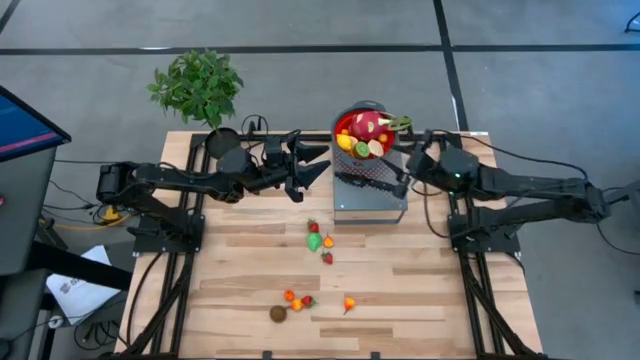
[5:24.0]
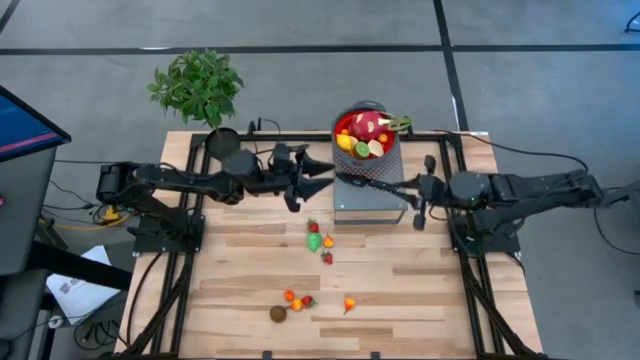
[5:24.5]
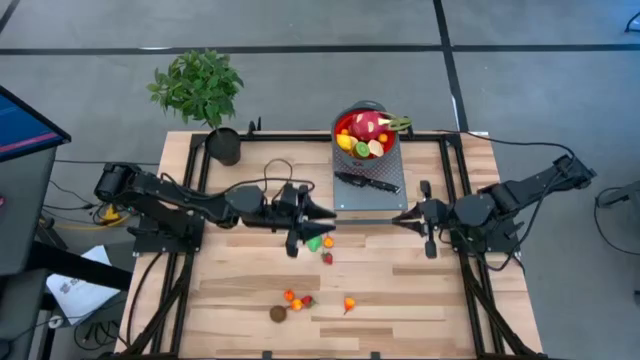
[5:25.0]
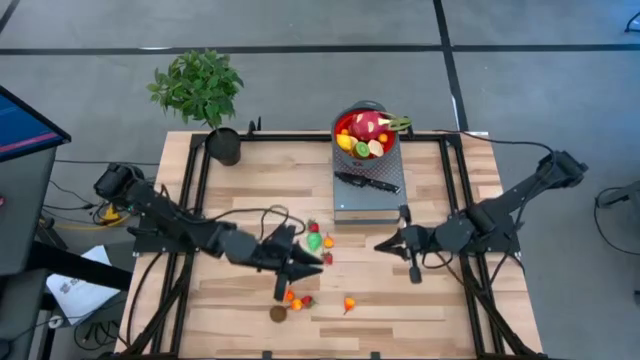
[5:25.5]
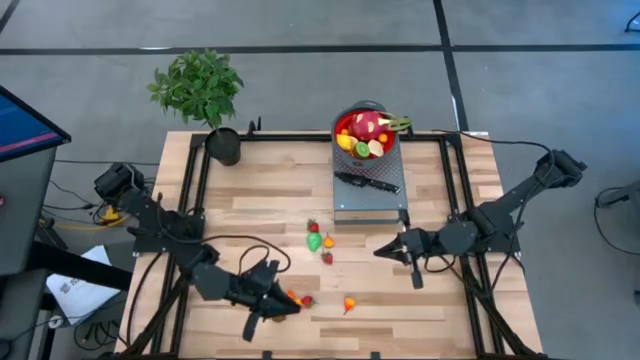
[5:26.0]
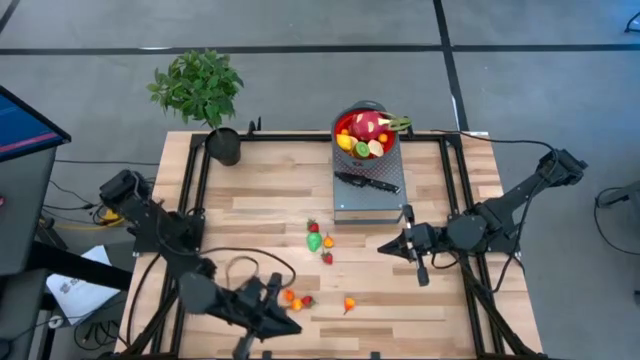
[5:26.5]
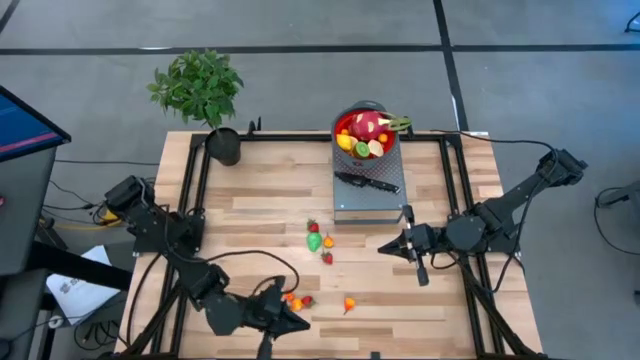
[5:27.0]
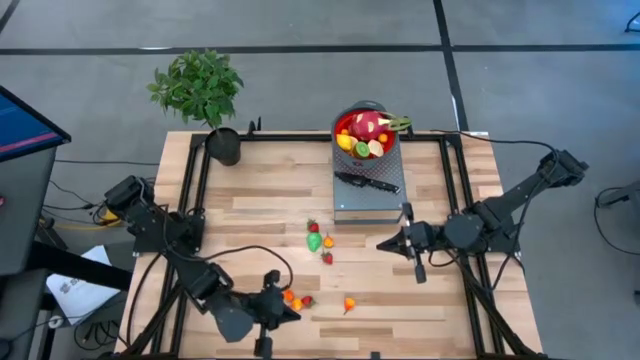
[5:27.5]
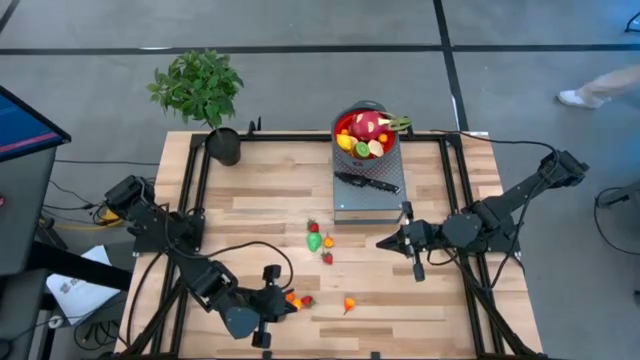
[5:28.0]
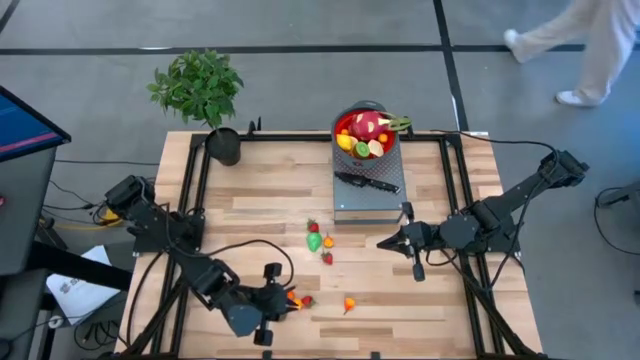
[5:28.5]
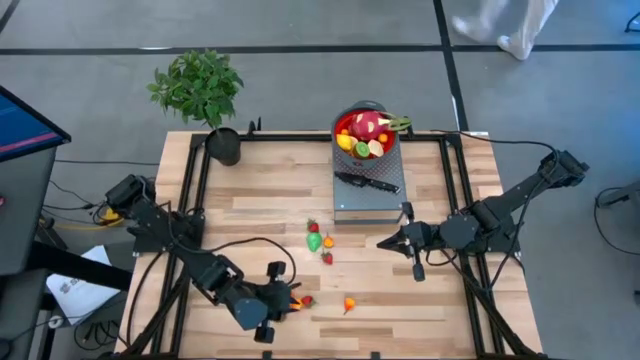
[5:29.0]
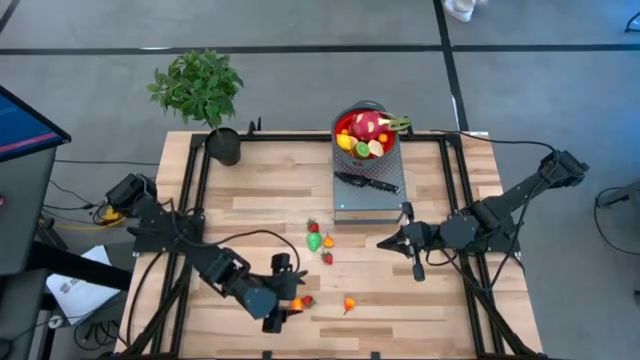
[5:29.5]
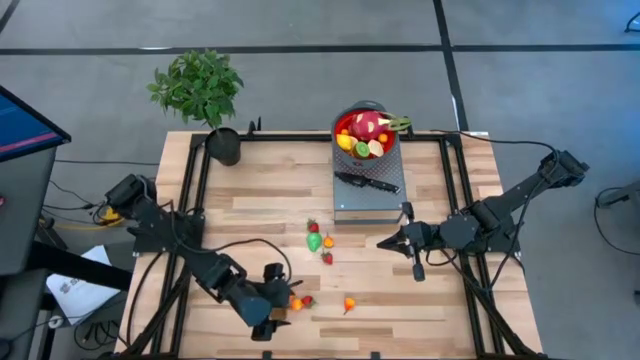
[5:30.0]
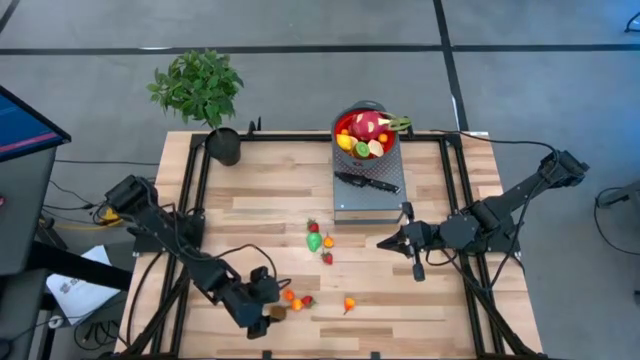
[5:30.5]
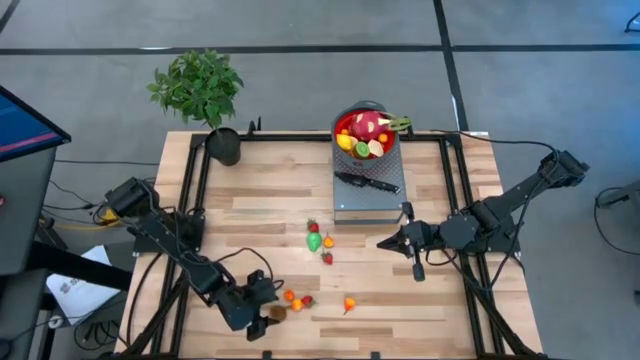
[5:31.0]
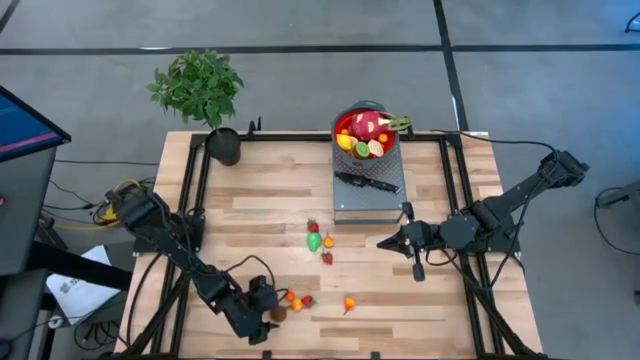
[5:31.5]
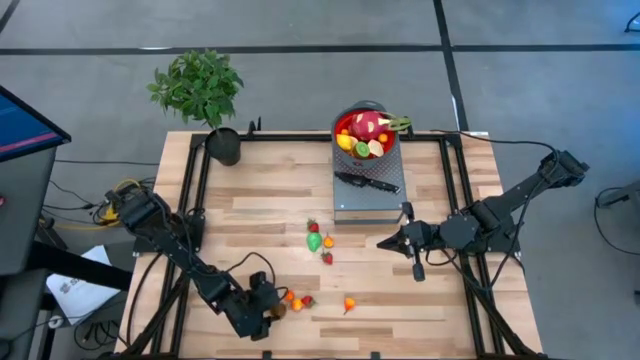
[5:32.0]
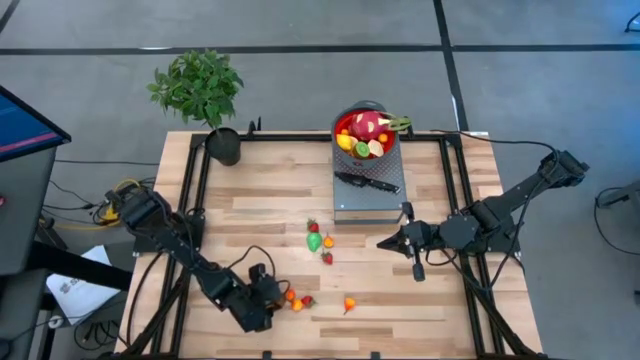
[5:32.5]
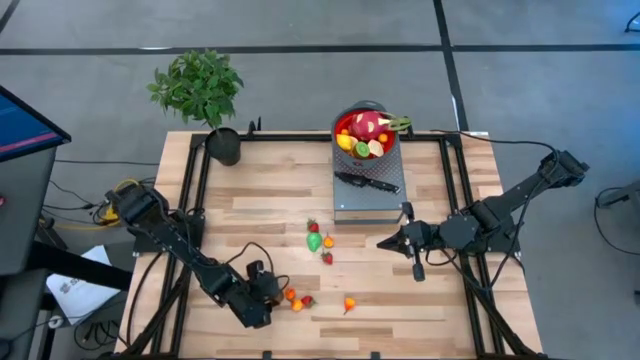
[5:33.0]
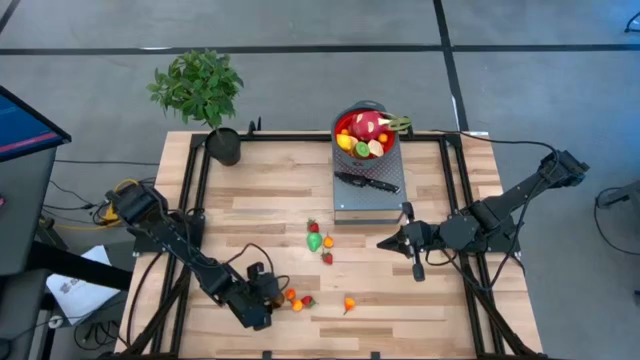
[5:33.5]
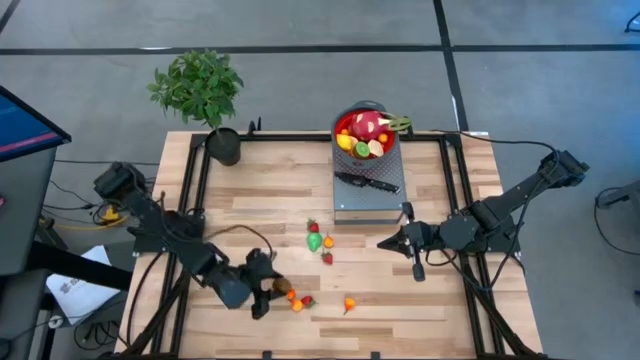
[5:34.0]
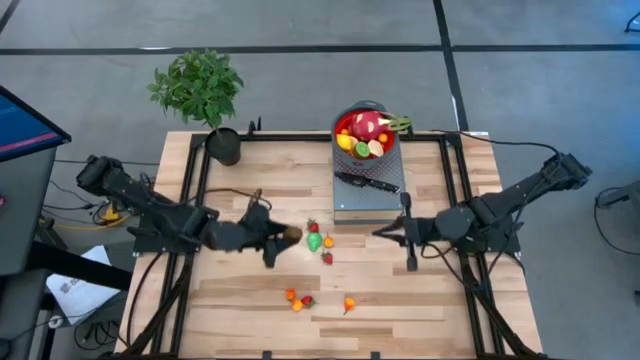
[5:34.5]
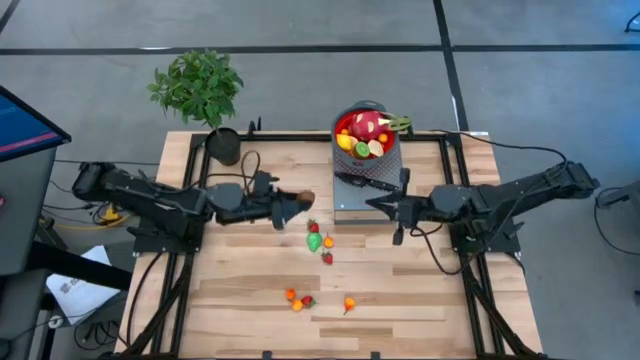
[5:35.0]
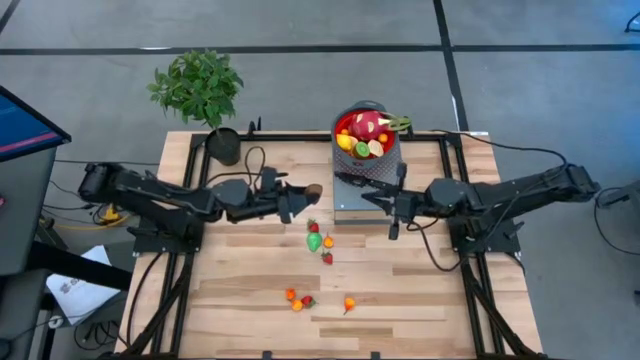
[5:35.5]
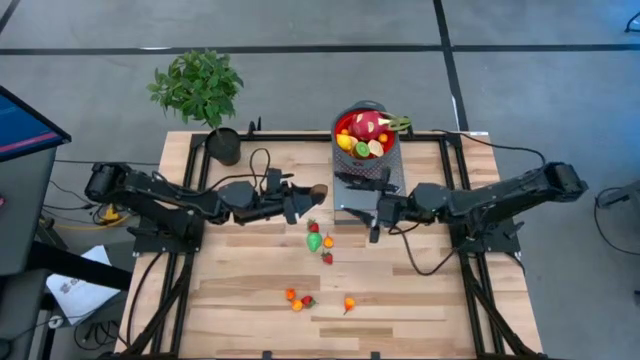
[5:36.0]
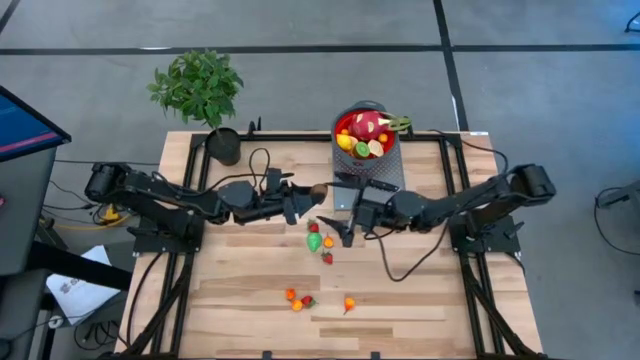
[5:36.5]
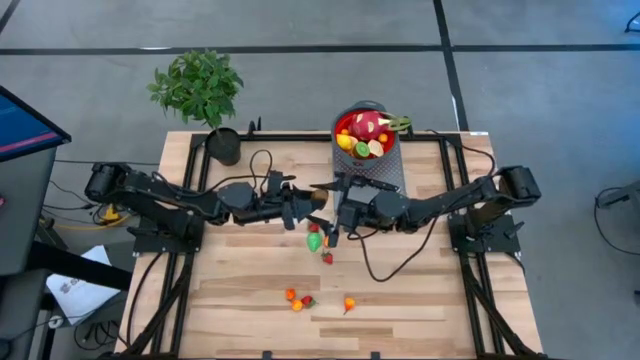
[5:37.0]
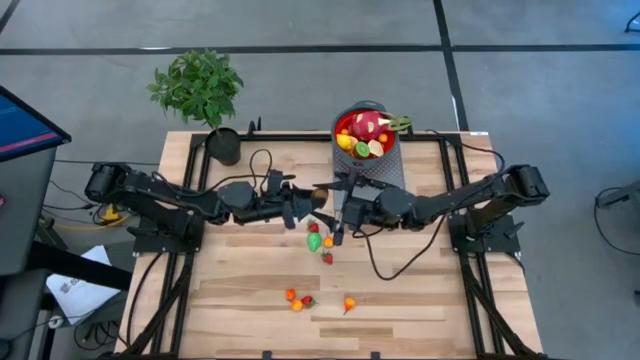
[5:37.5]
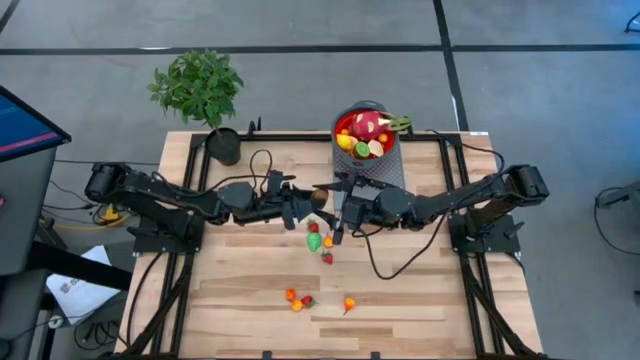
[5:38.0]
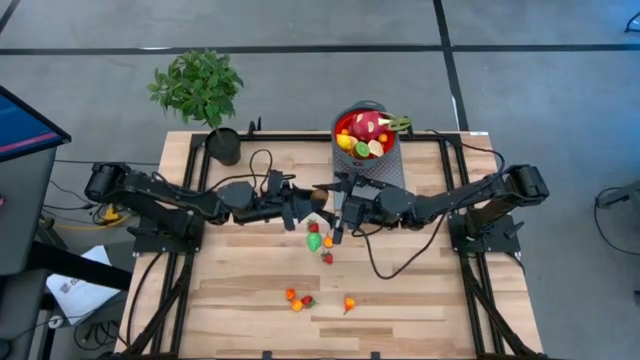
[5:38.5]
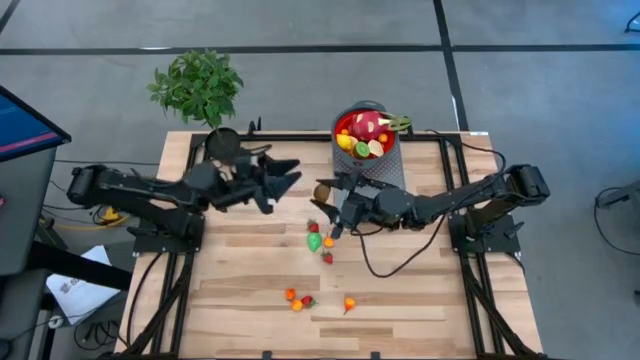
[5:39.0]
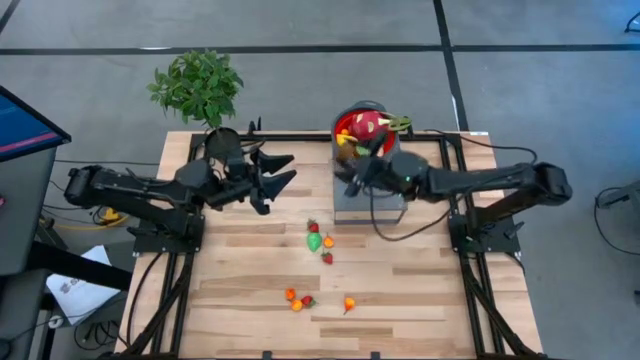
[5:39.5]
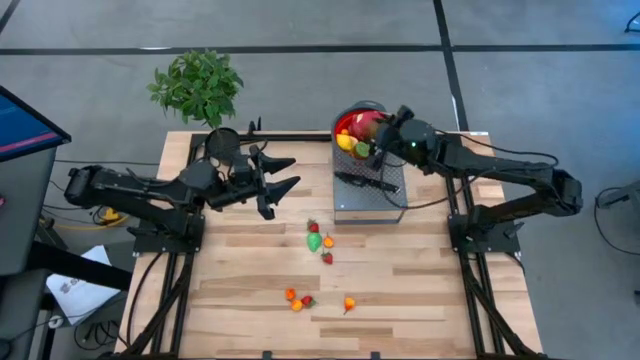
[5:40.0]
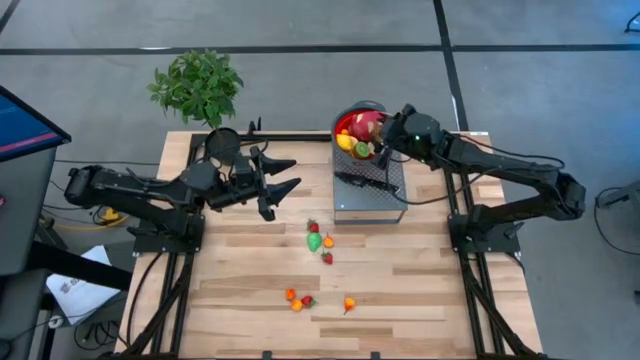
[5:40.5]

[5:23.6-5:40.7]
Task: Pick & Place Fruit
Put the half kiwi into the red colander on the shelf

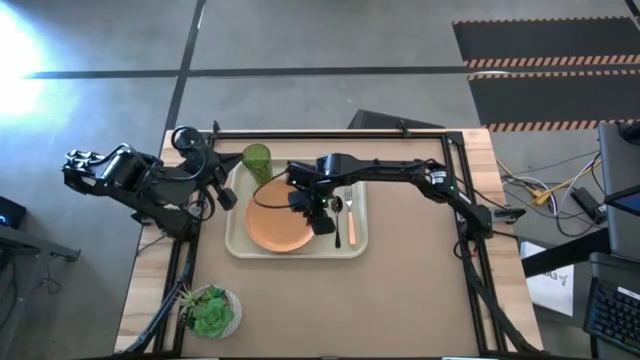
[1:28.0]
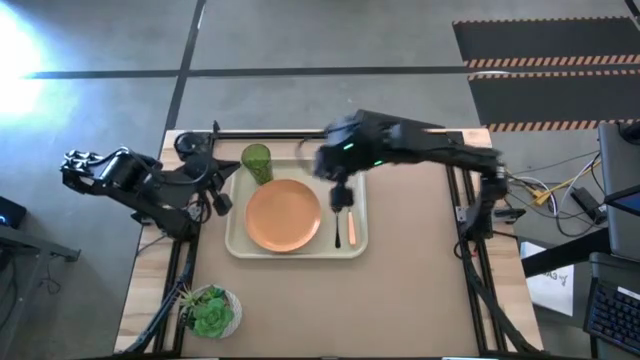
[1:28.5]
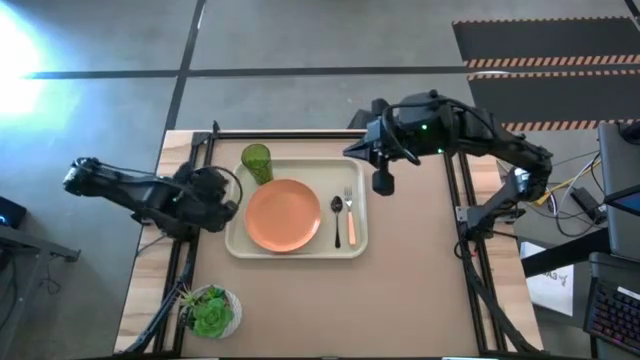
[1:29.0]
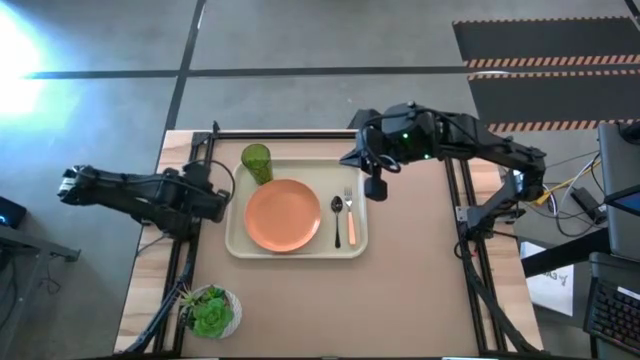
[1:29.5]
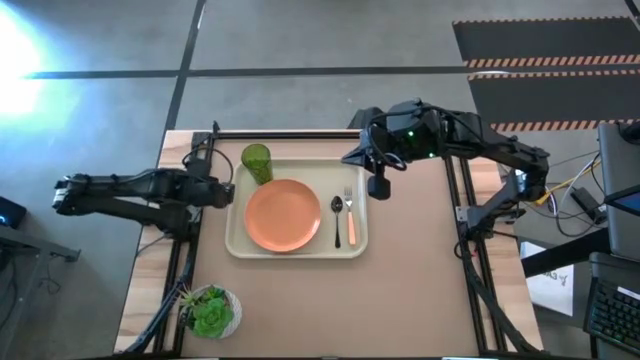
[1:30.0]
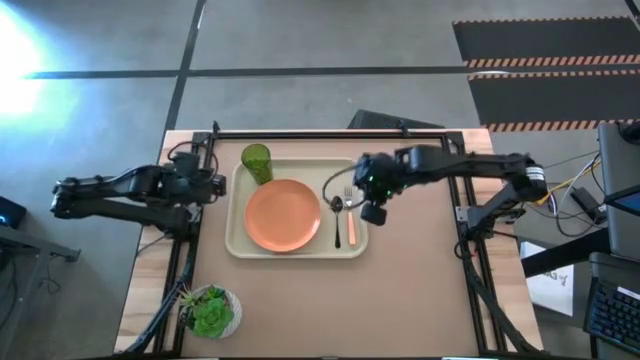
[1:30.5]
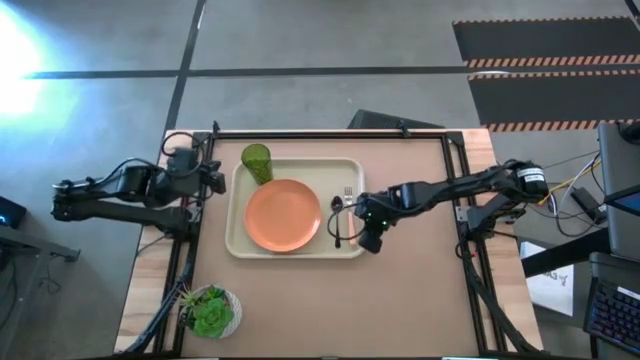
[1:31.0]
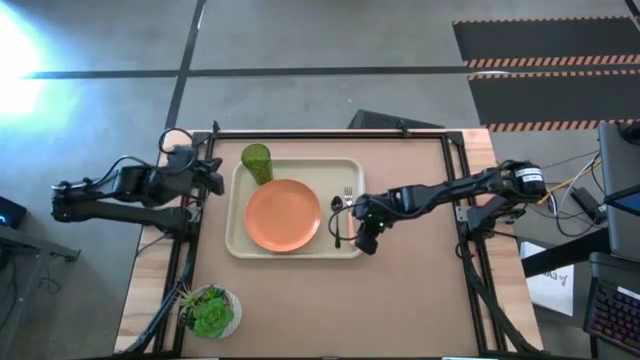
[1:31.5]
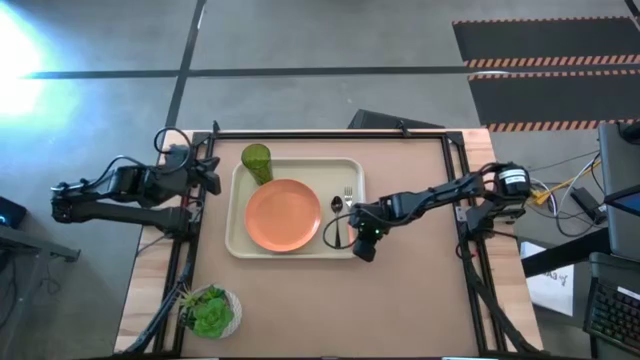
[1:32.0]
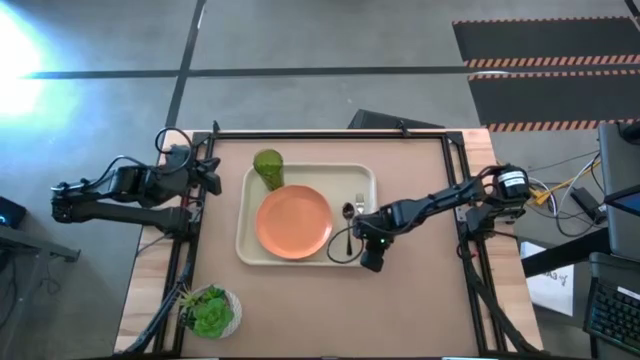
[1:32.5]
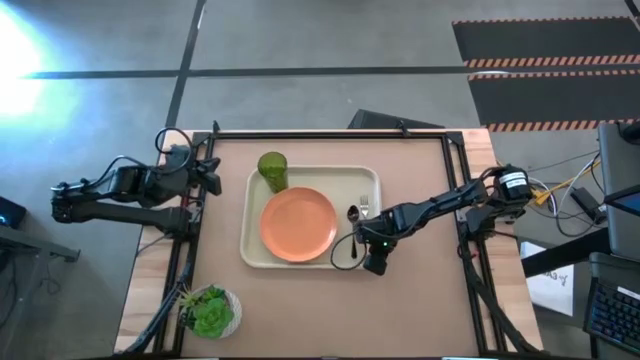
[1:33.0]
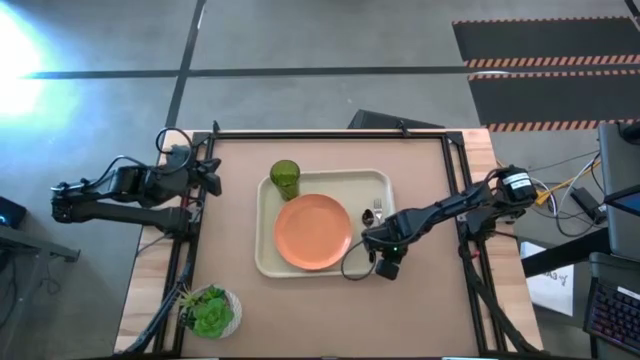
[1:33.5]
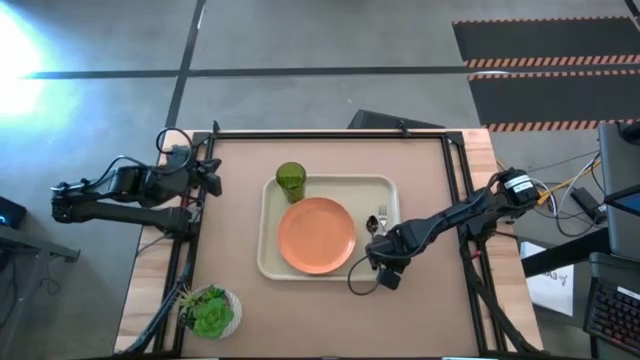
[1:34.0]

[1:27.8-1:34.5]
Task: Pick and place plate/cup/fork/spoon on tray
Move the white tray to center of the table
